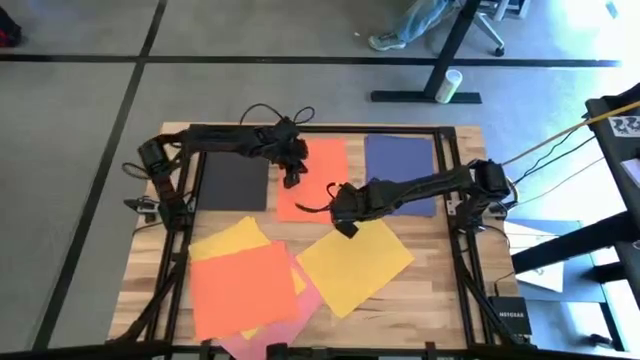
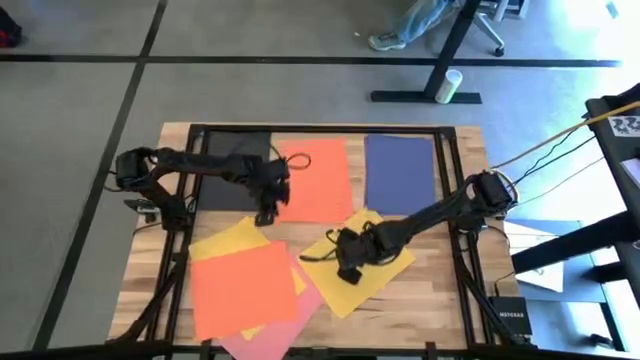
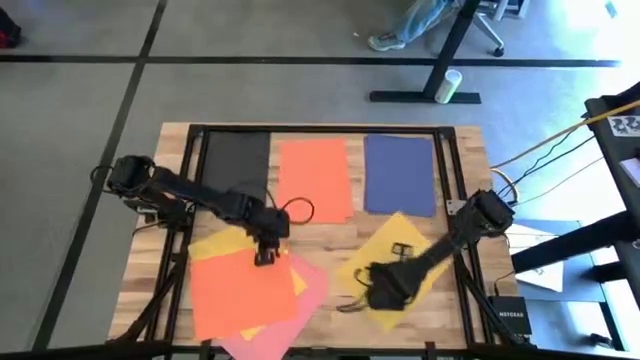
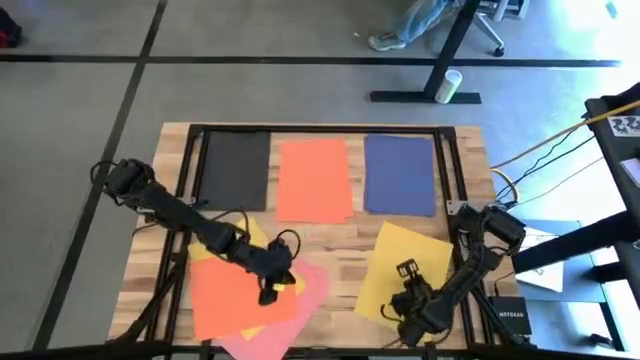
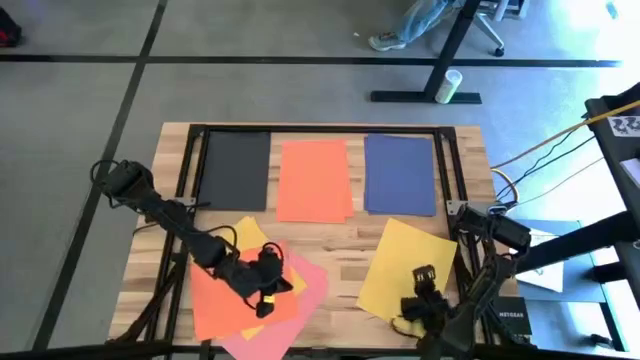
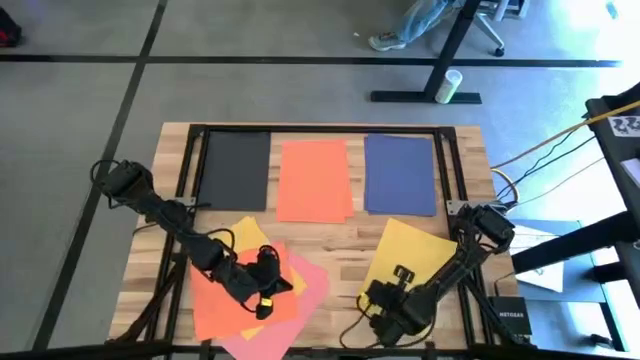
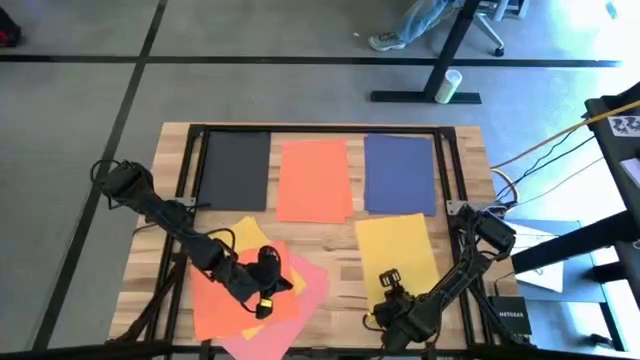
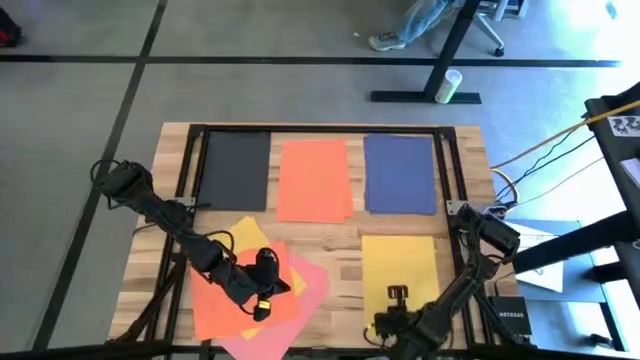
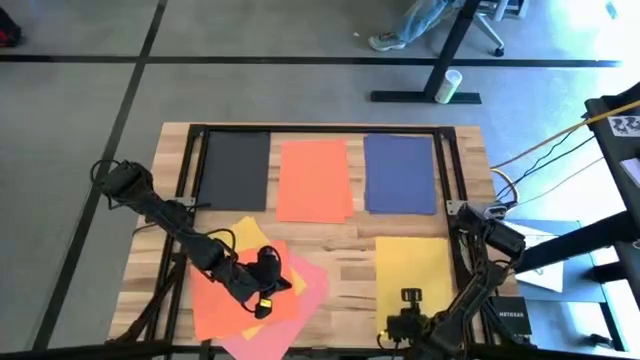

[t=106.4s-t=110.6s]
Task: Organize paper
Move the yellow paper to the bottom left of the table

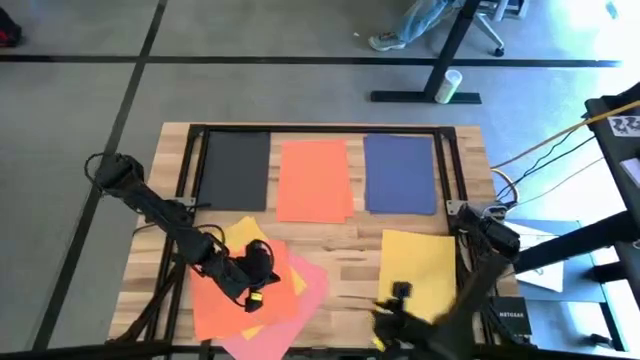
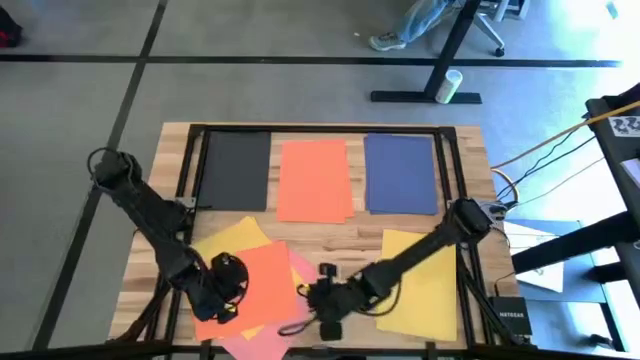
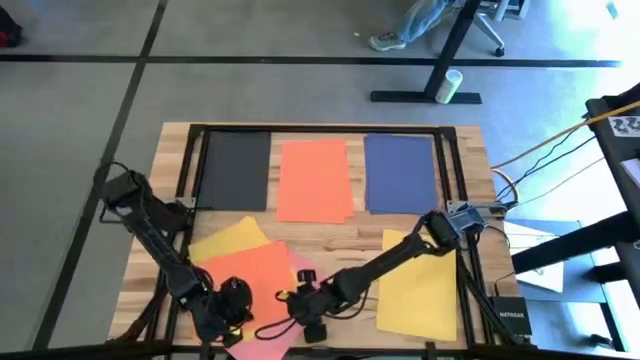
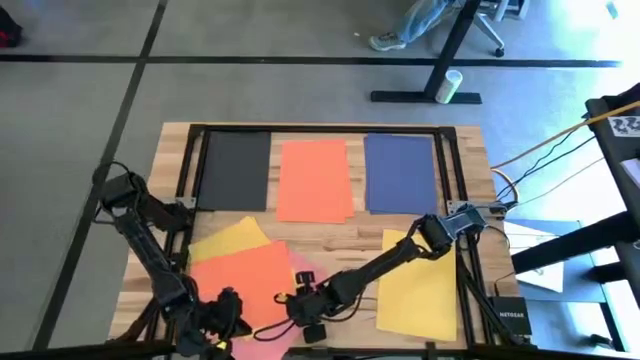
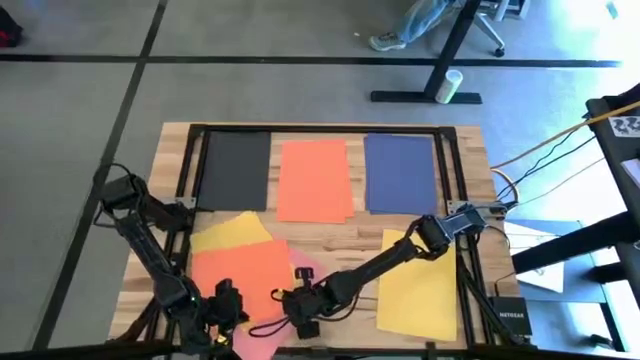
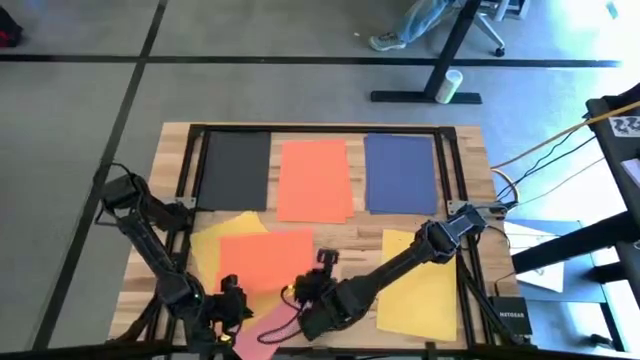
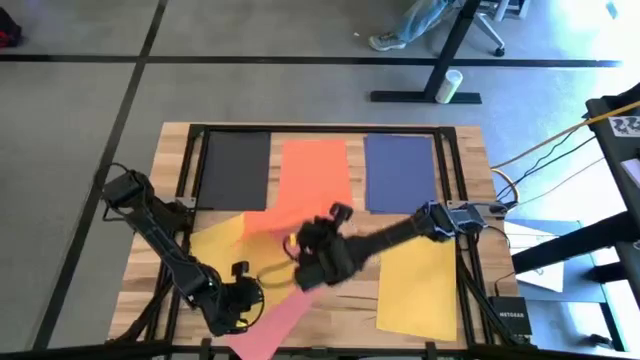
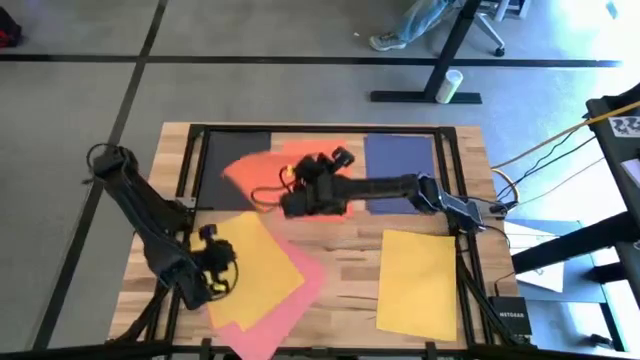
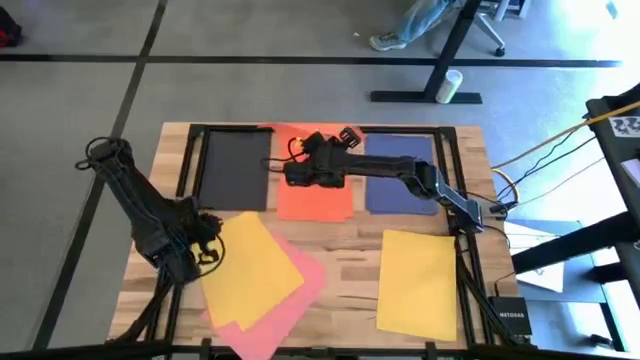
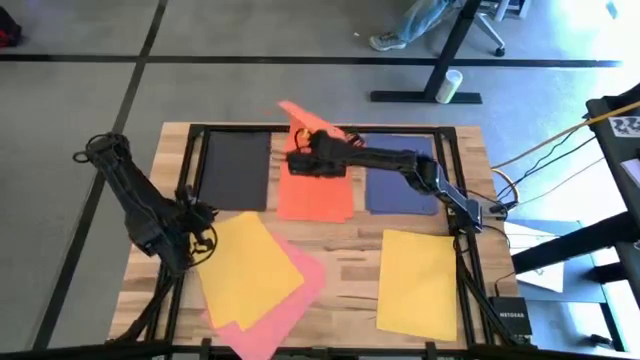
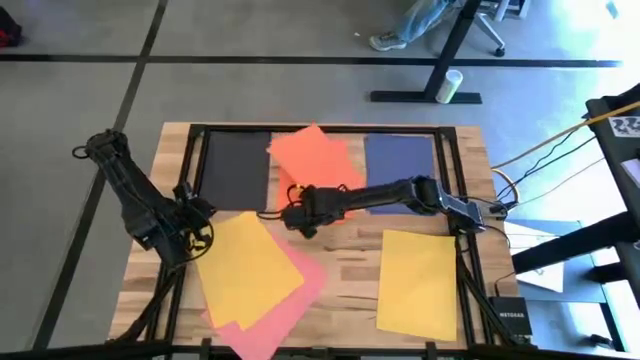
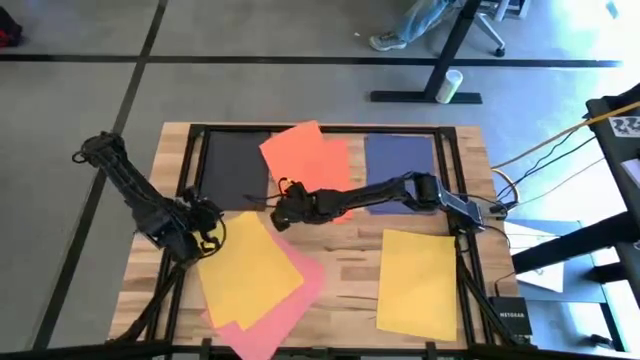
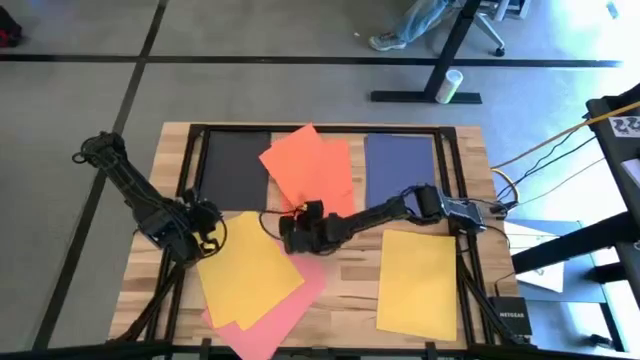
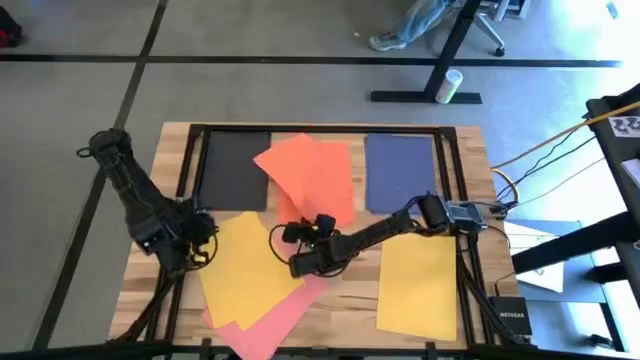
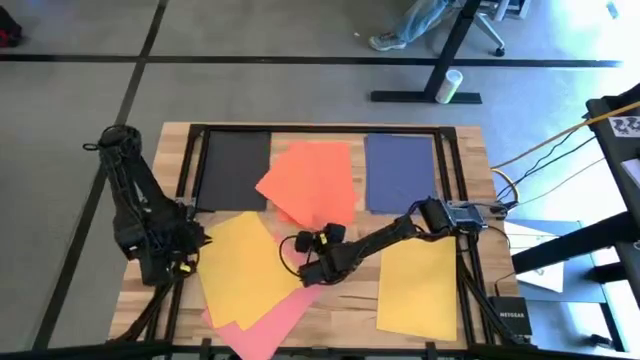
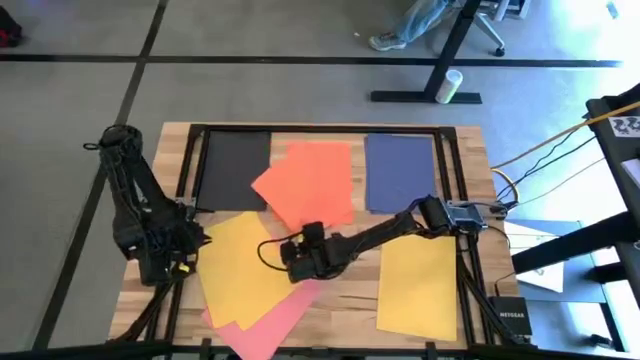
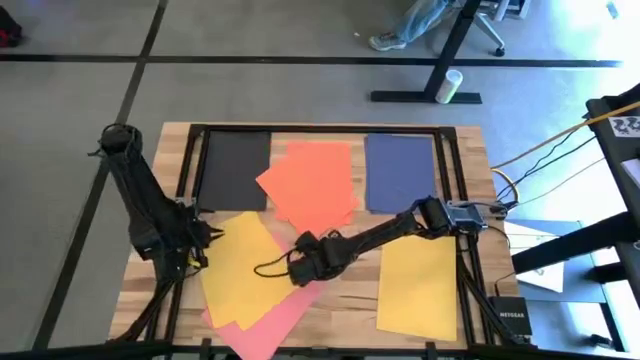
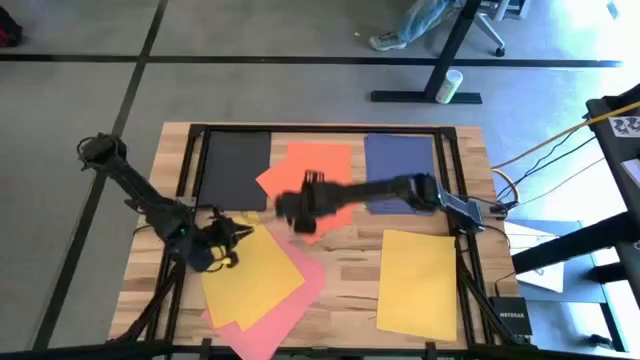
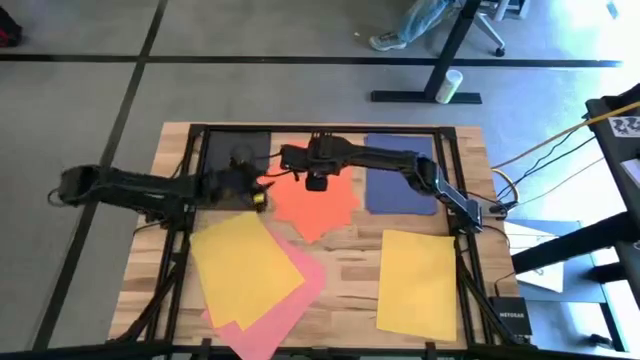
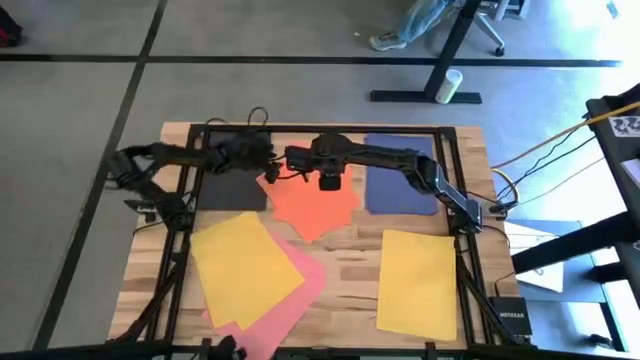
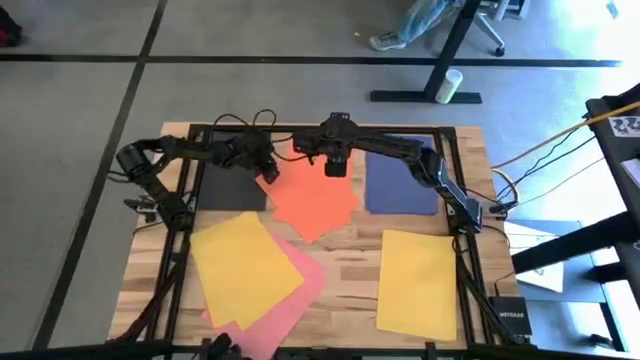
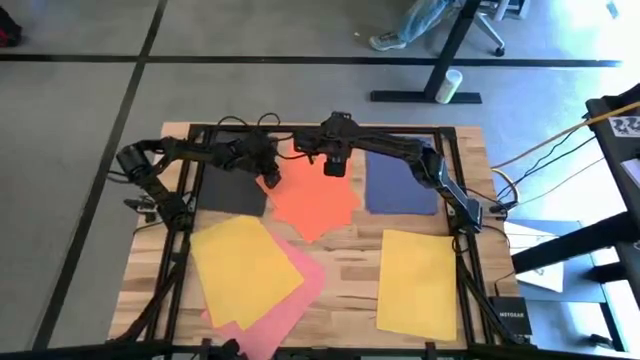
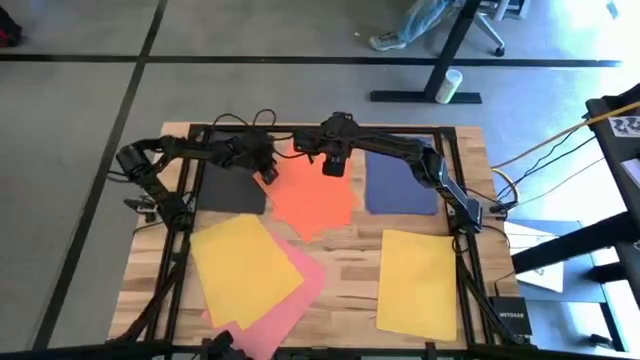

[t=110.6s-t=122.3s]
Stack the orange paper on top of the other orange paper

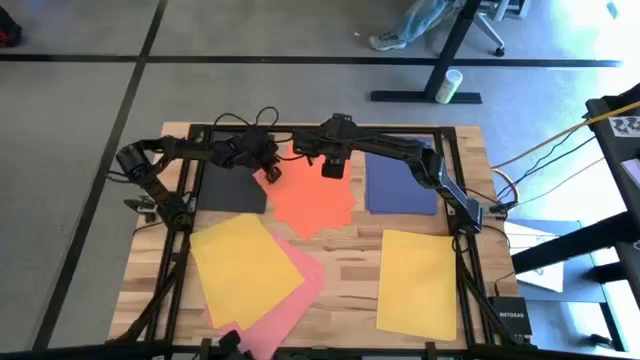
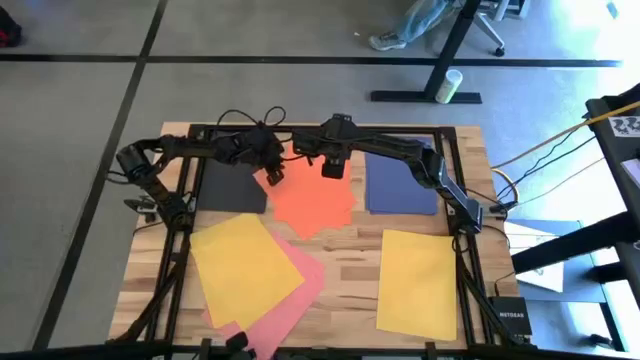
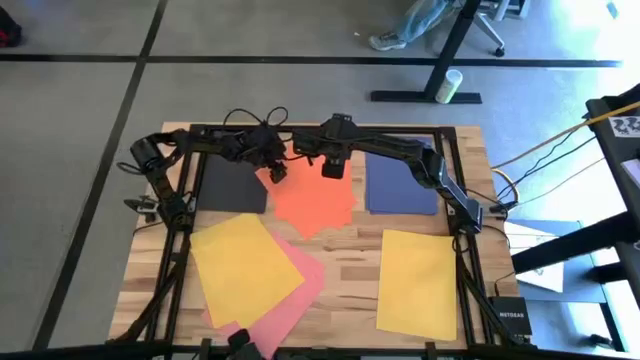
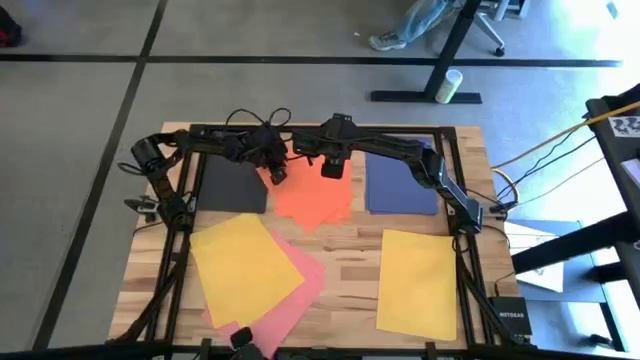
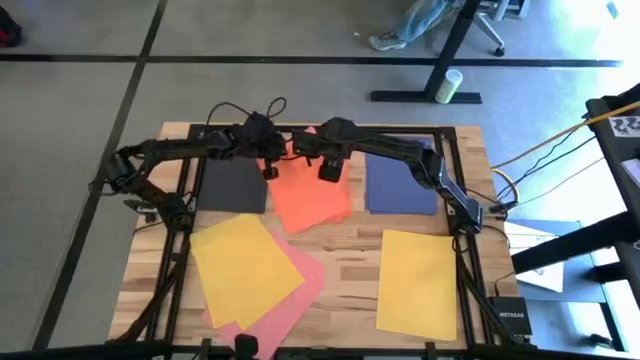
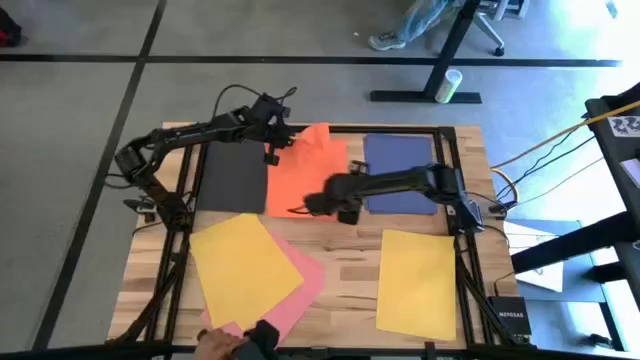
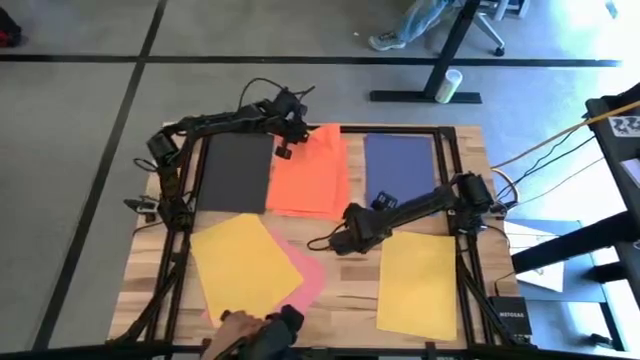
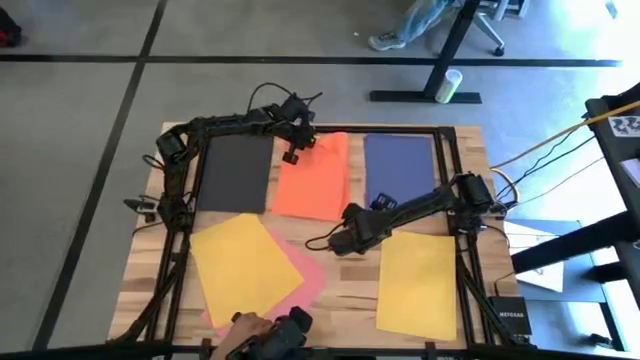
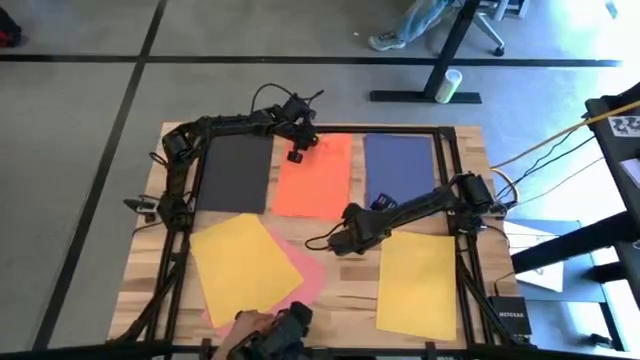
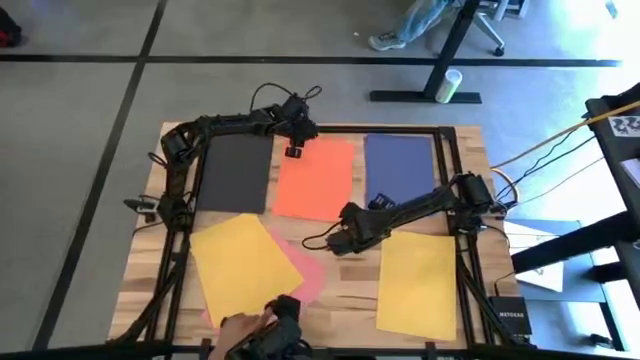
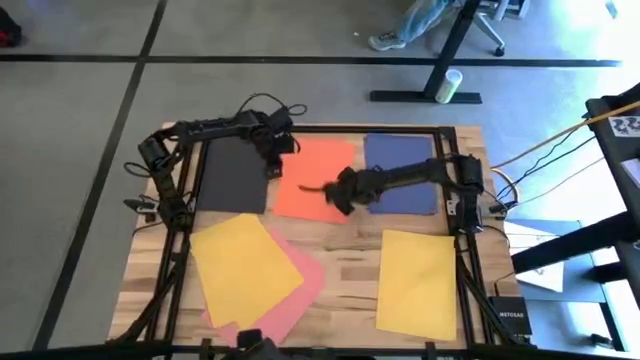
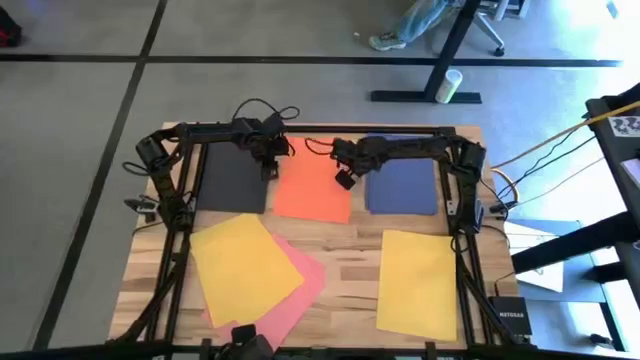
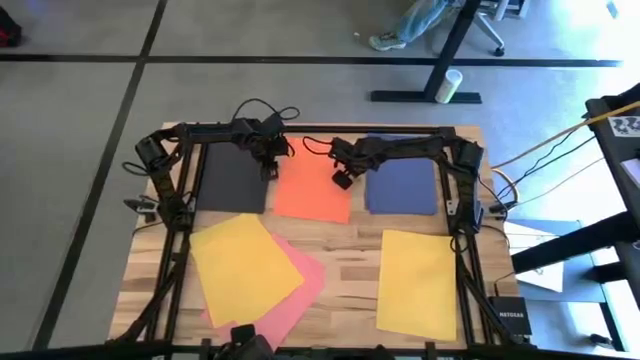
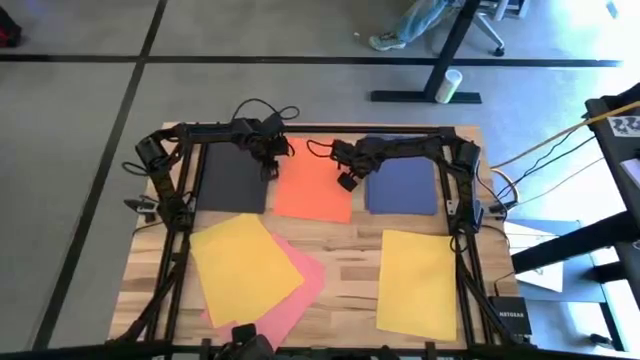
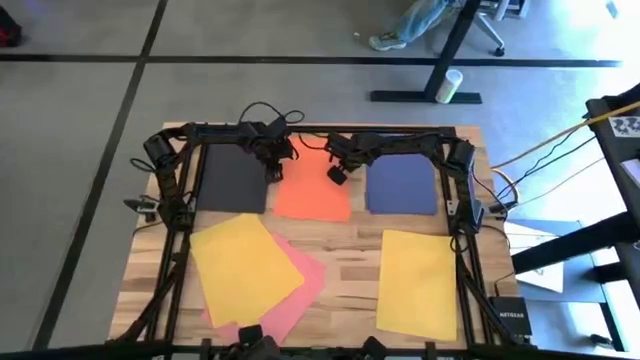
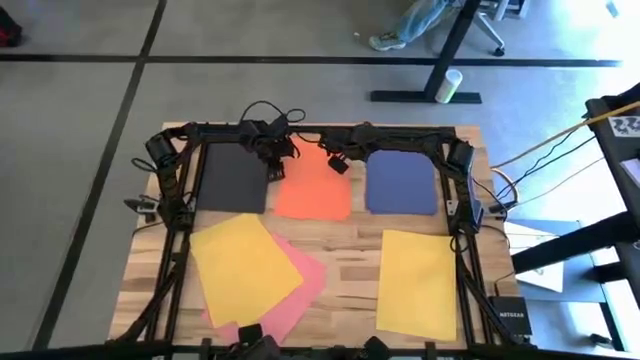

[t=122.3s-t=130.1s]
Stack the orange paper on top of the other orange paper
